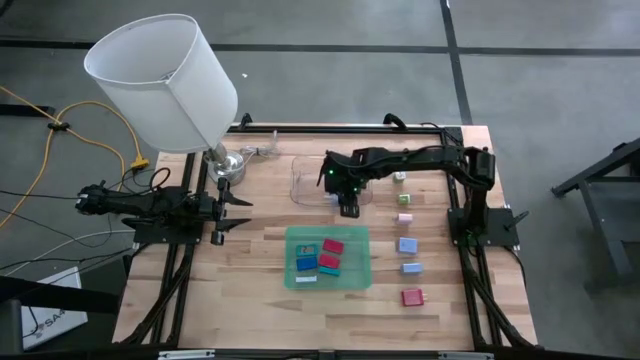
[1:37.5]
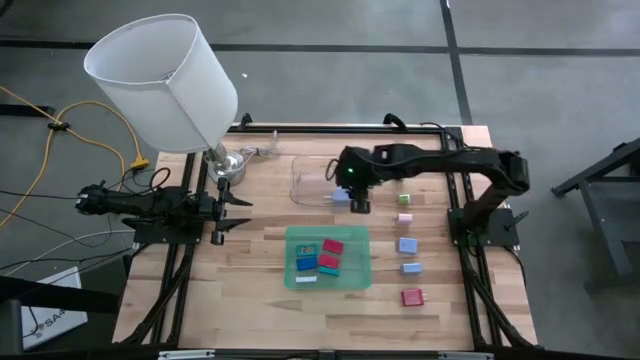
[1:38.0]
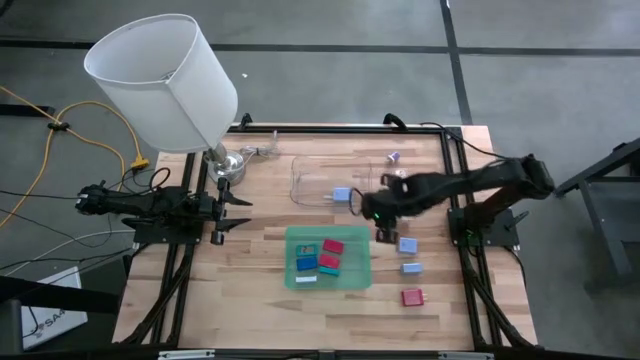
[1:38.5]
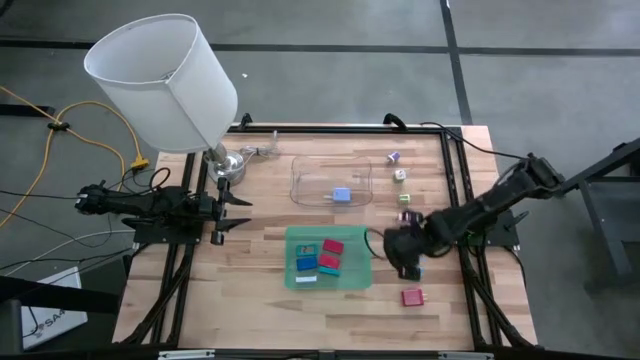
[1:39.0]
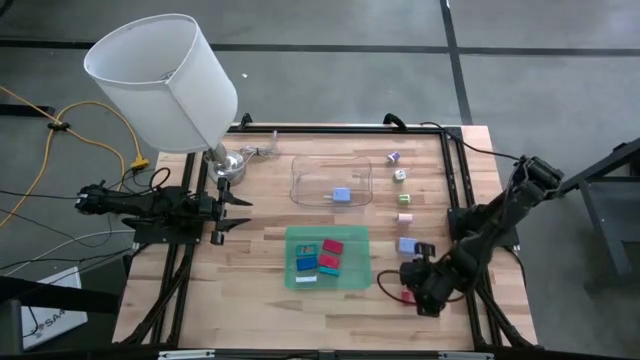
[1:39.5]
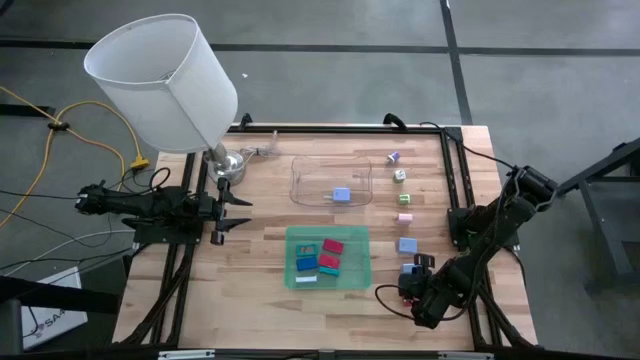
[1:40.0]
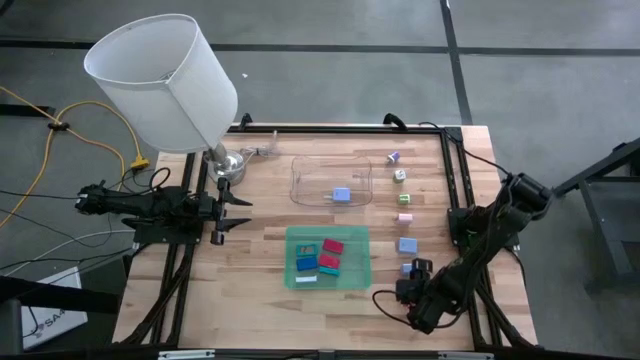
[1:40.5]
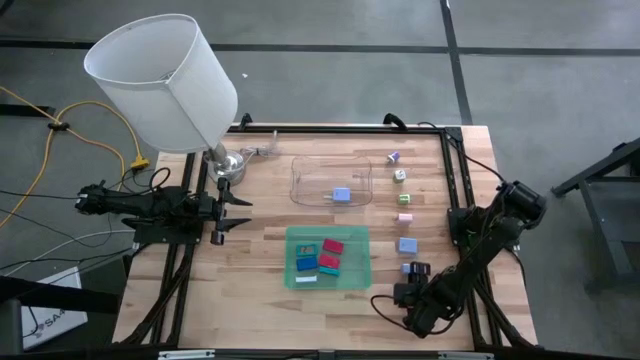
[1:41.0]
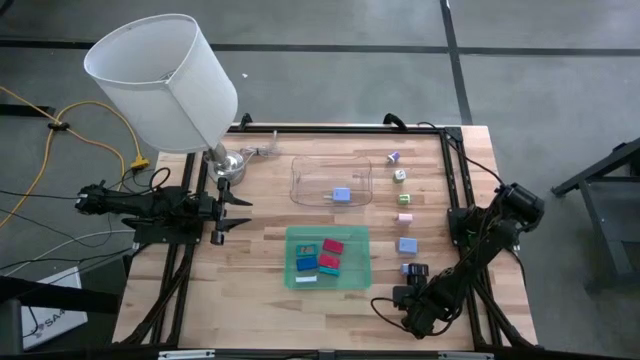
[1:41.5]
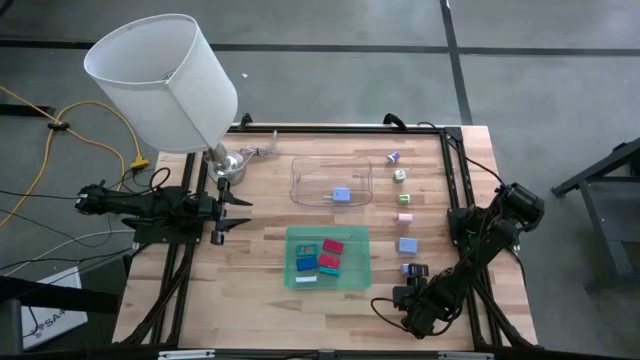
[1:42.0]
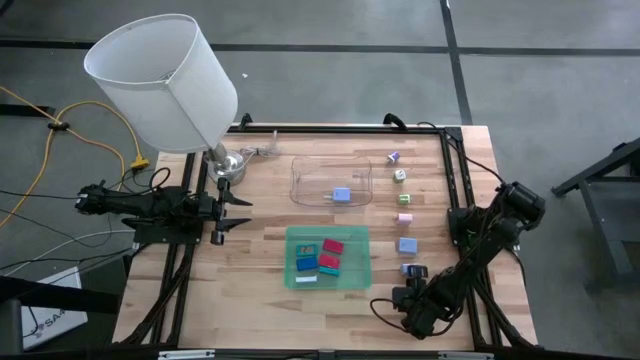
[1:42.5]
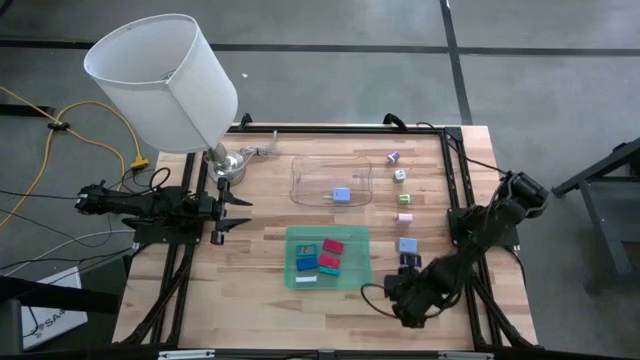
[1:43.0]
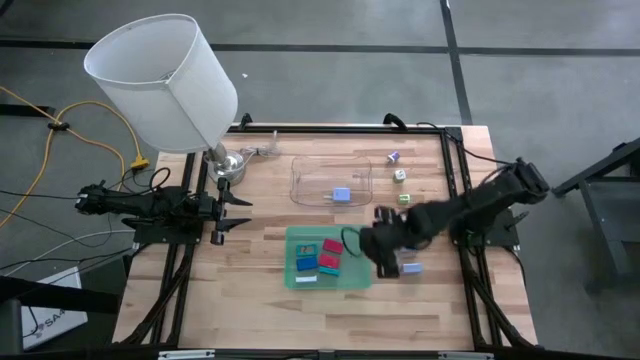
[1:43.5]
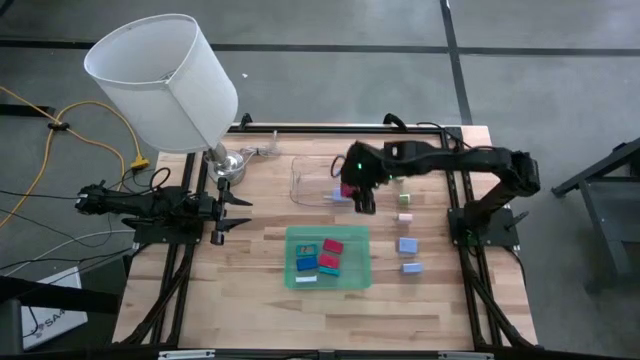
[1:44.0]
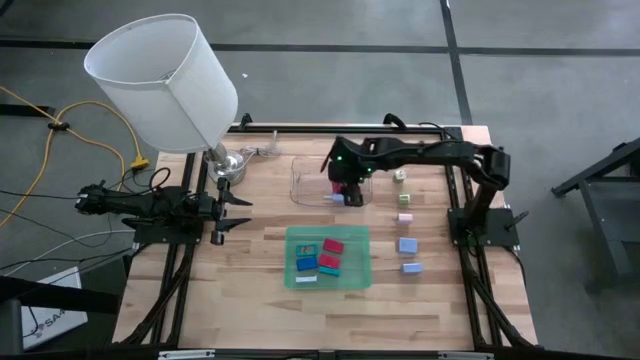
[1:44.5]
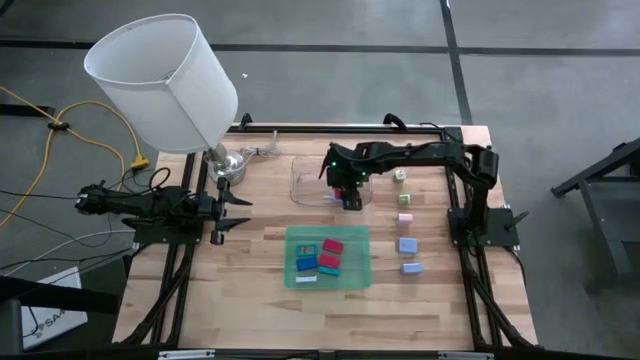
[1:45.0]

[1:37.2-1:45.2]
Task: Pick & Place Office items
Put the red charger adapter into transparent bin

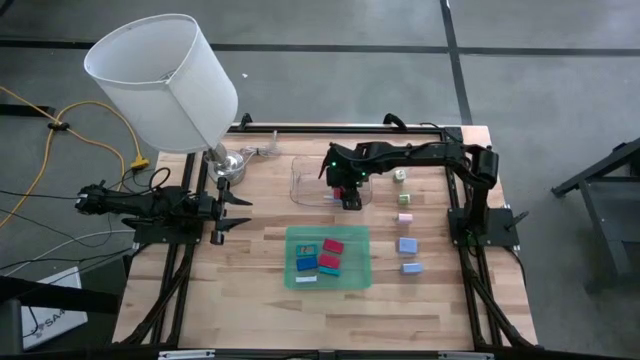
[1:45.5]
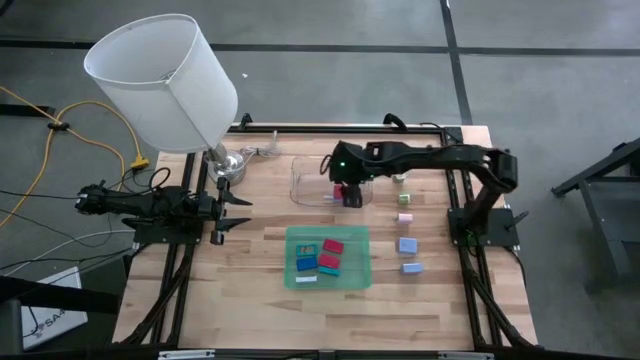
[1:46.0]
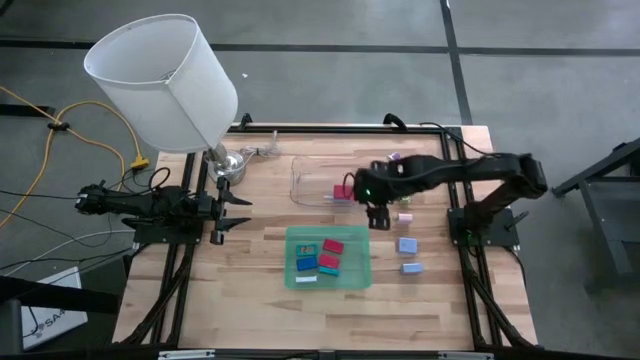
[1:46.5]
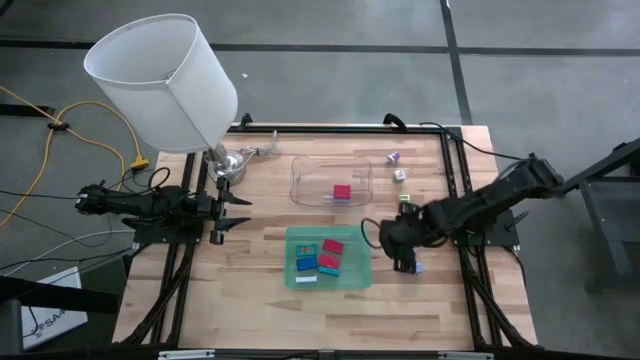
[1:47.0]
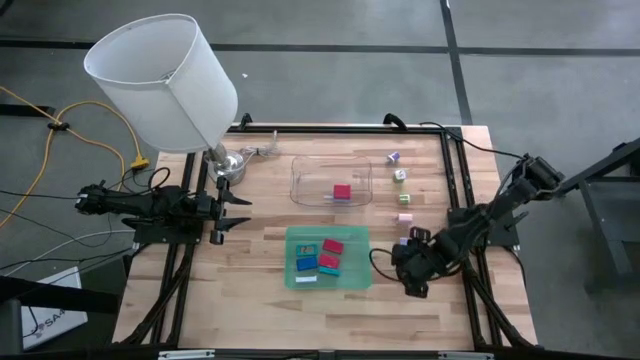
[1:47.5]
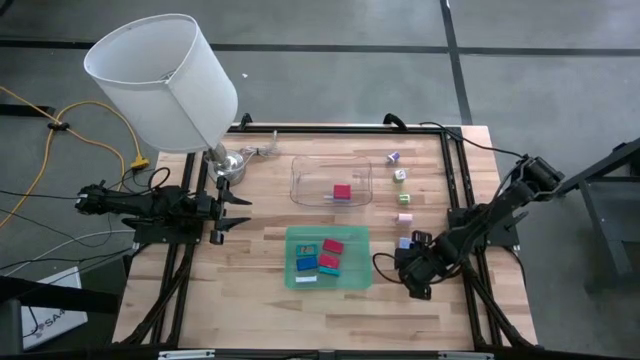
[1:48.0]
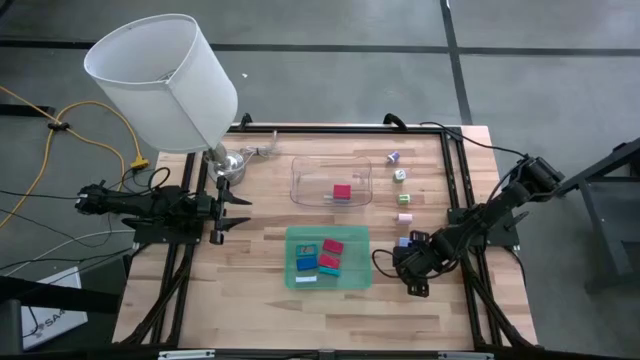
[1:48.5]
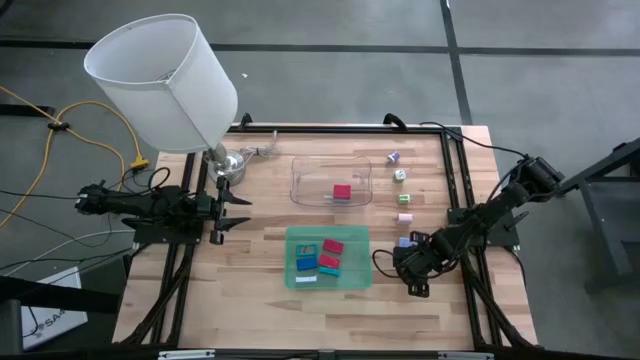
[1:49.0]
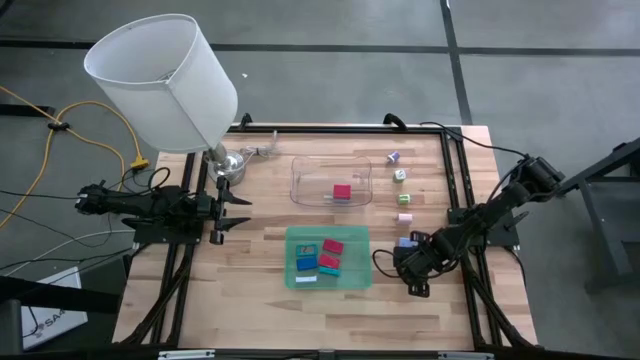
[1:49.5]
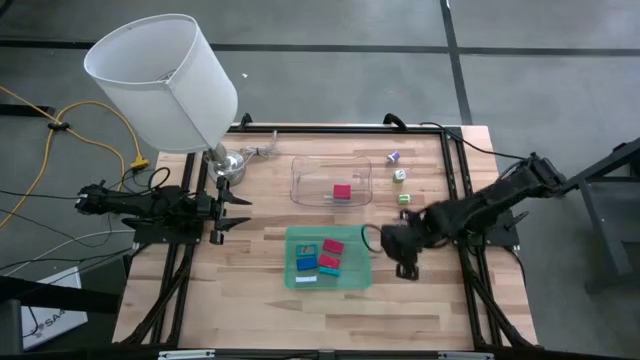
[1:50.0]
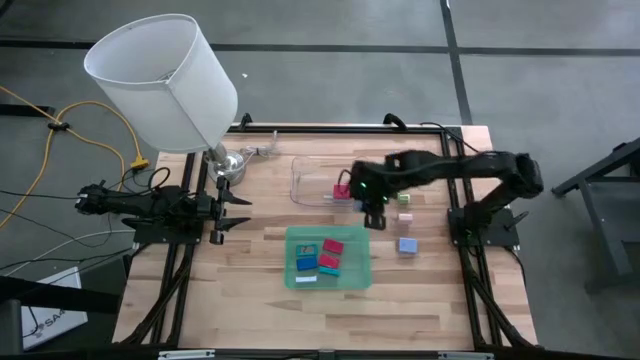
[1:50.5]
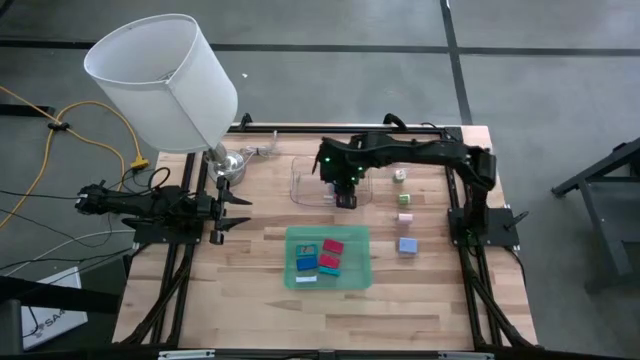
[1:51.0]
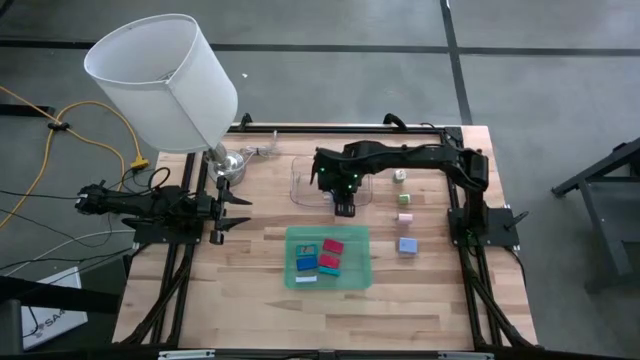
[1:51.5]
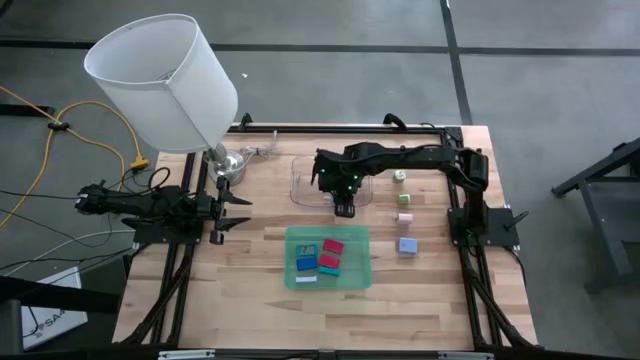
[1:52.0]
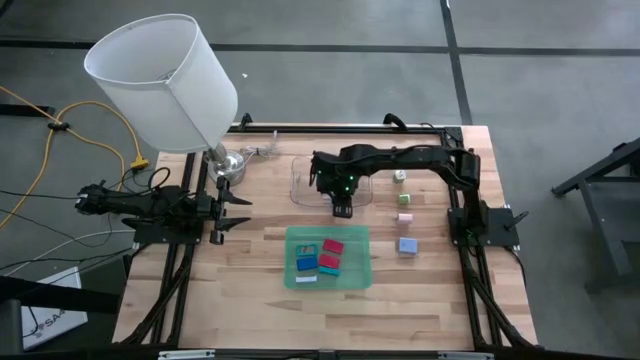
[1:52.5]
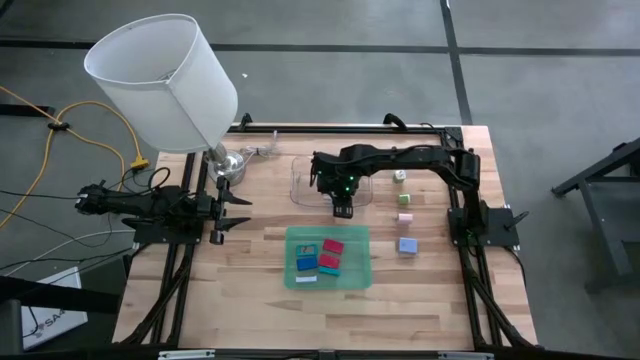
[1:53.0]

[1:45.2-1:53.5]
Put the bottom purple charger adapter into transparent bin

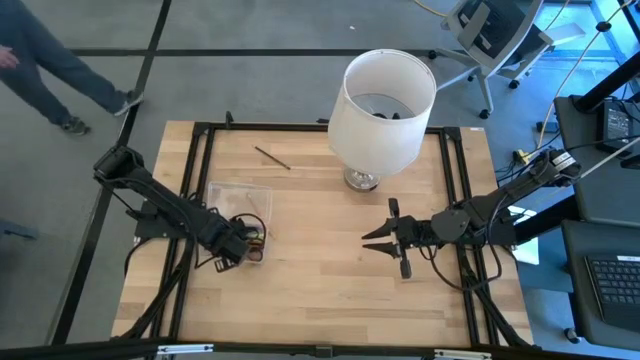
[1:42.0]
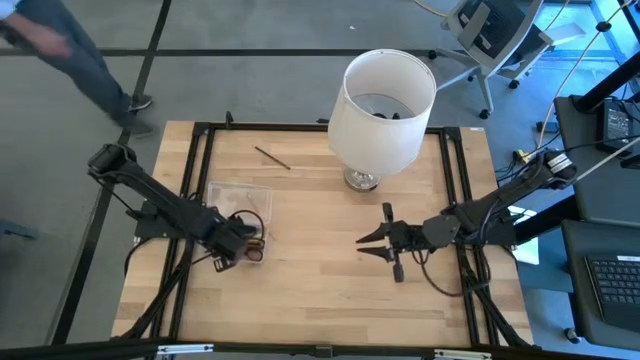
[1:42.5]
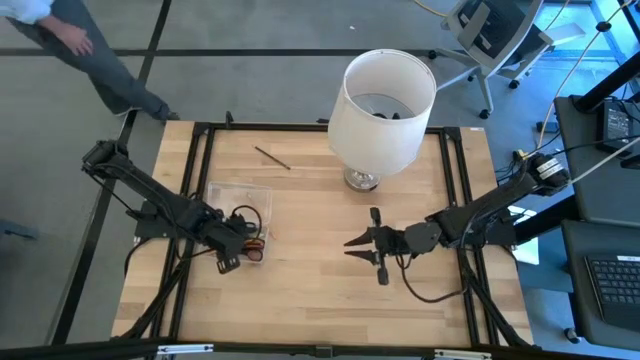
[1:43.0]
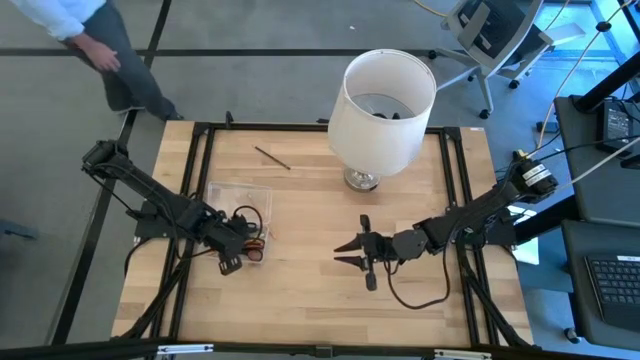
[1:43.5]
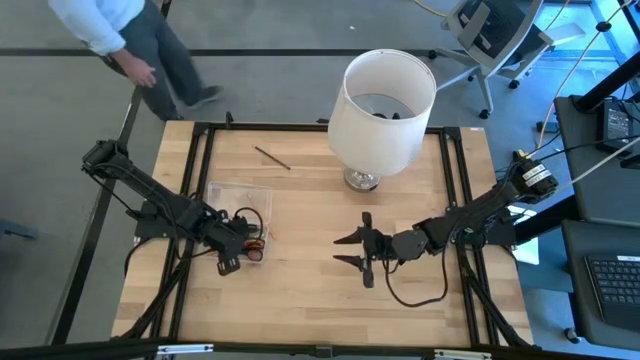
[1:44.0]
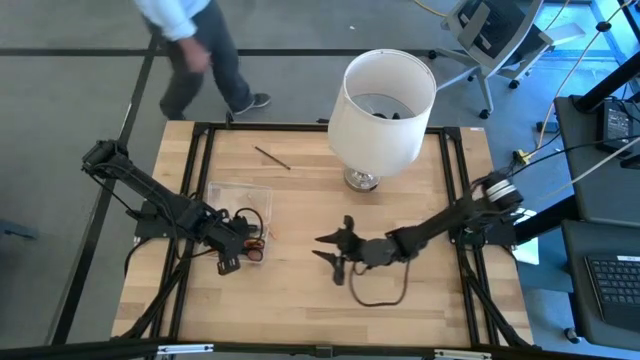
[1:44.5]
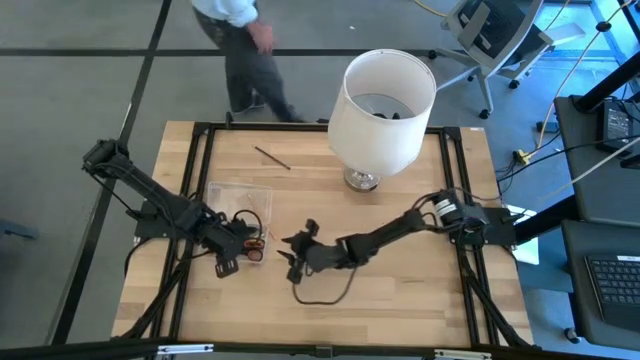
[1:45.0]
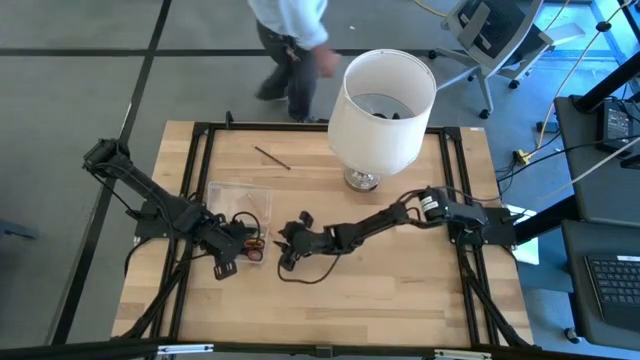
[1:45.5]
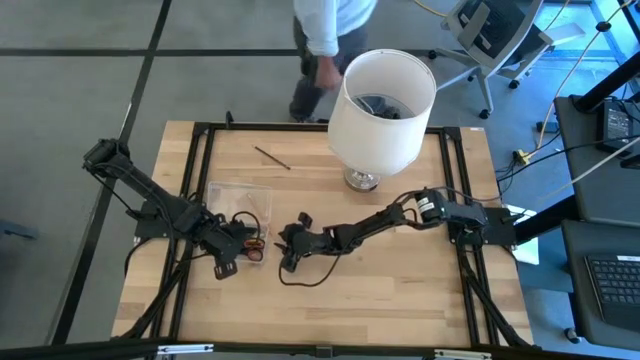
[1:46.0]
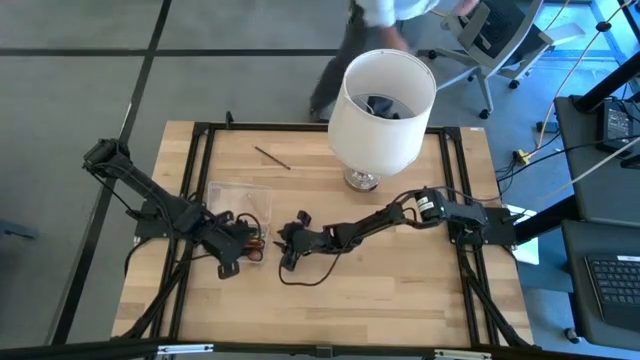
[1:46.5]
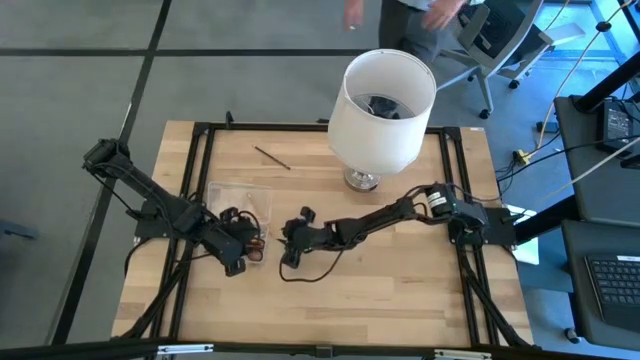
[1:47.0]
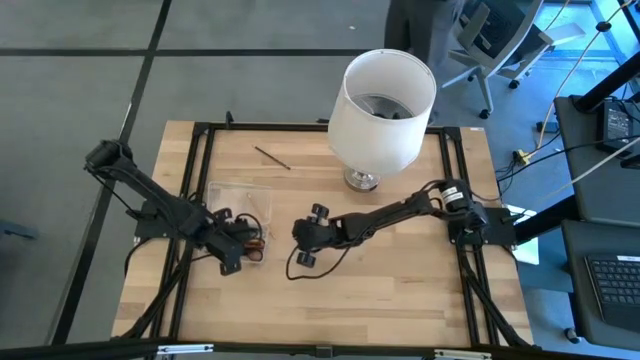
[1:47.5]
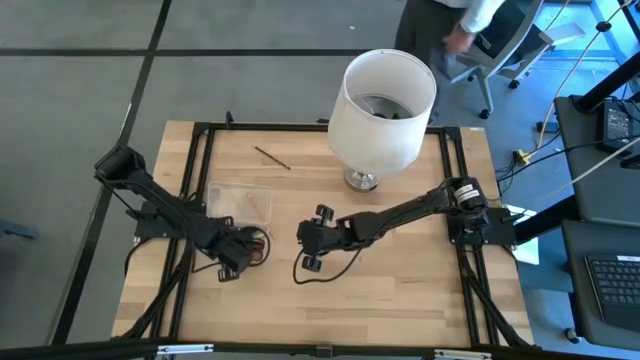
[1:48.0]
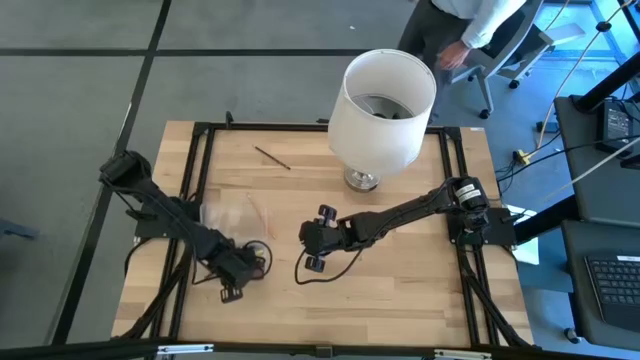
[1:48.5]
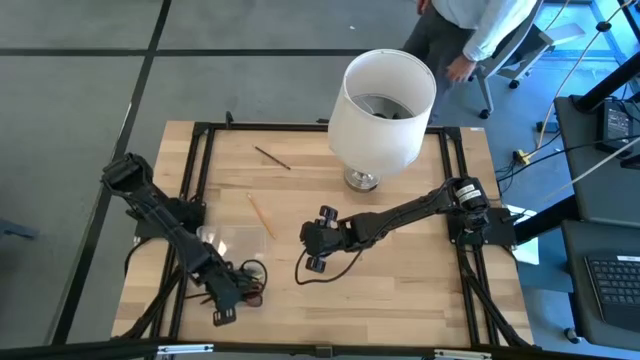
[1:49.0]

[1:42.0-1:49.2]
Task: Pick & place school supplies into a supply box
Adjust the transparent supply box
